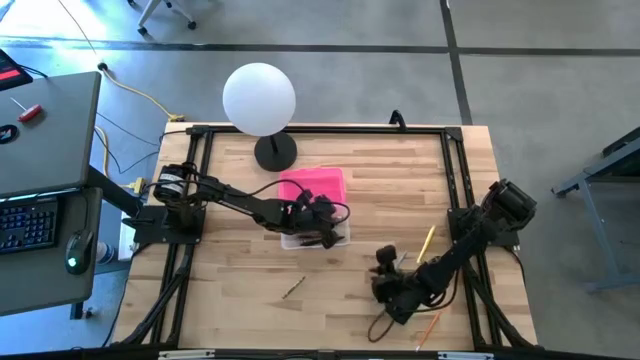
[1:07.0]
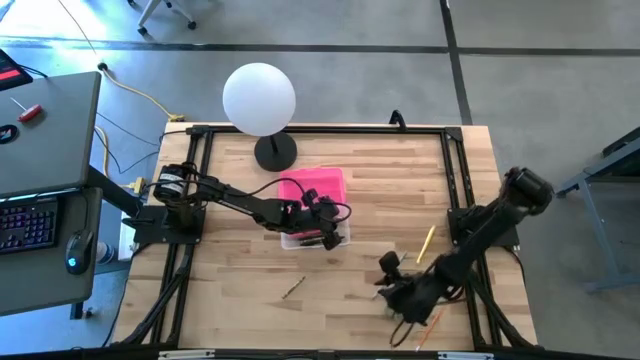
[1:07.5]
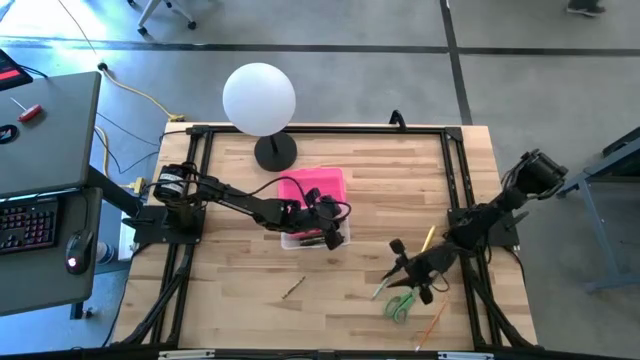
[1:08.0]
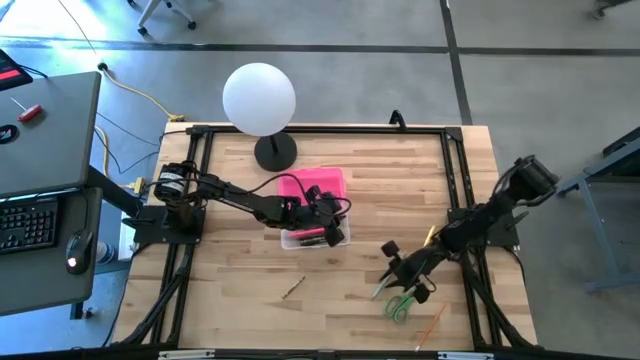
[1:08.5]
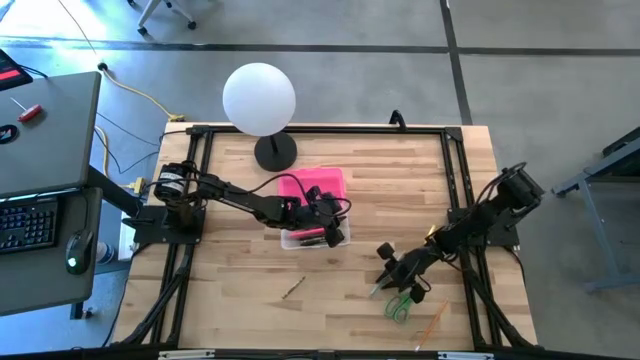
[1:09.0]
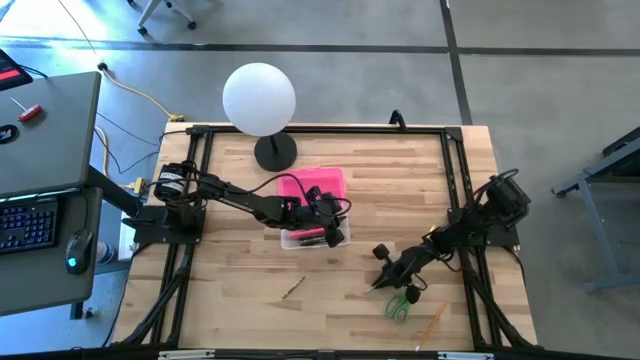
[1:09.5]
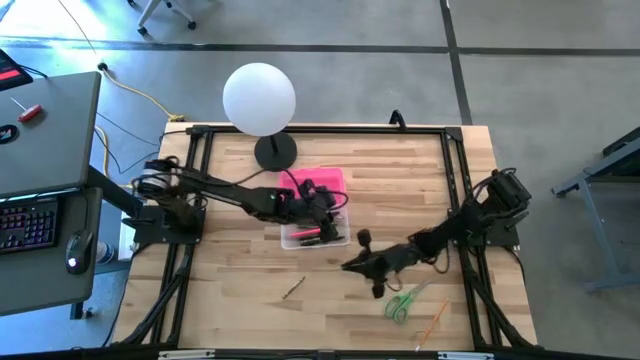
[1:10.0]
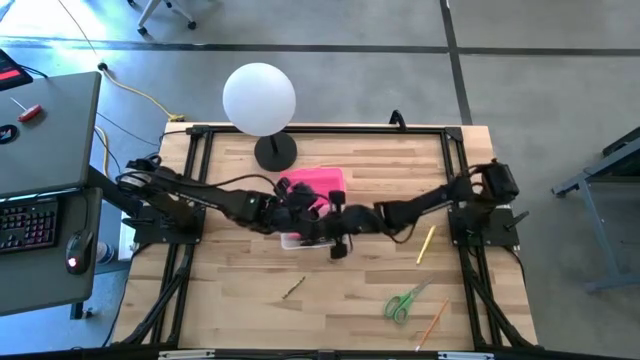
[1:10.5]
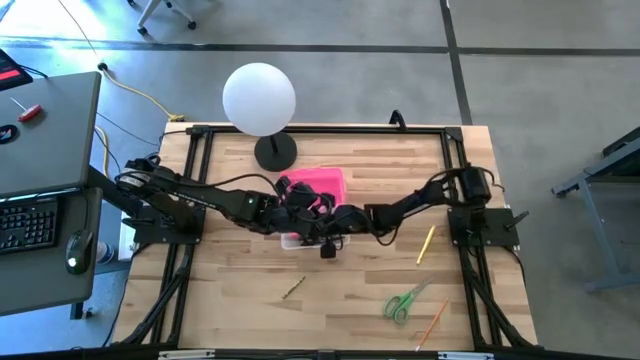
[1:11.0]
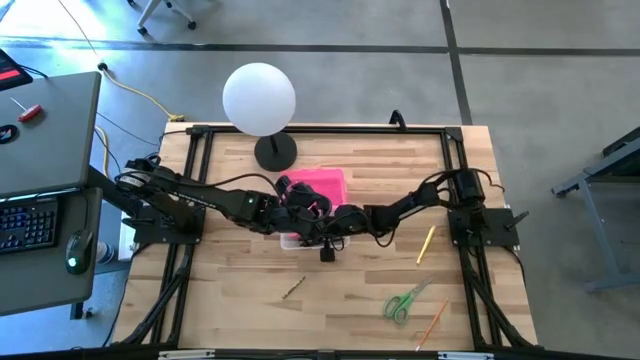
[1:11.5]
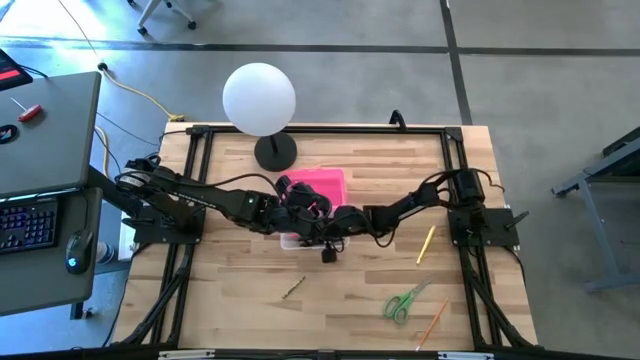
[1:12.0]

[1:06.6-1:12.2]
Task: Pick & place school supplies into a supply box
Put the blue pencil into the pink supply box

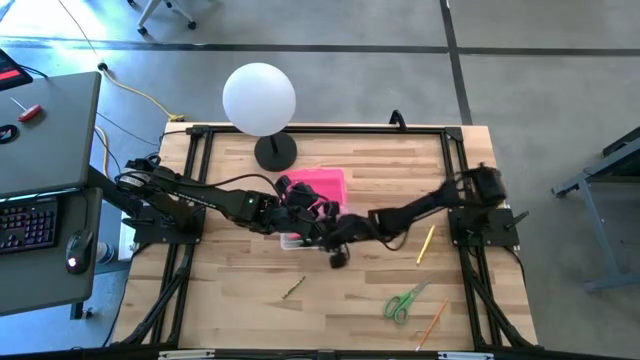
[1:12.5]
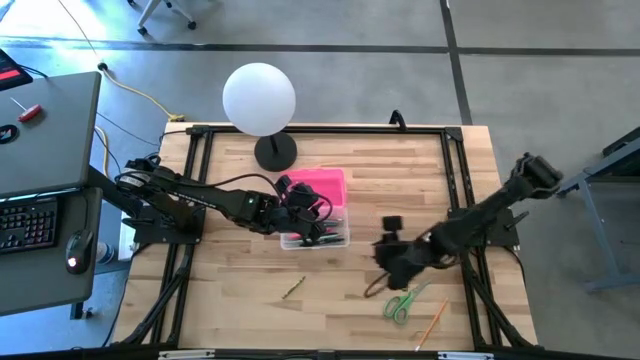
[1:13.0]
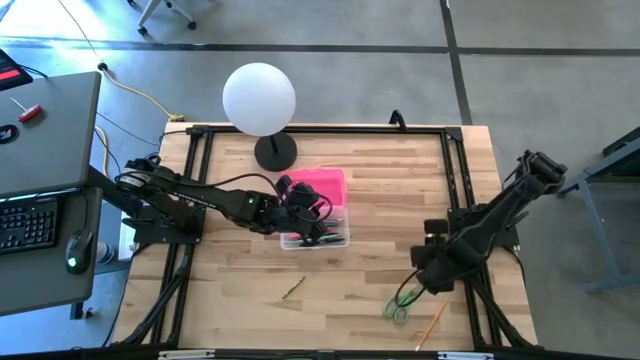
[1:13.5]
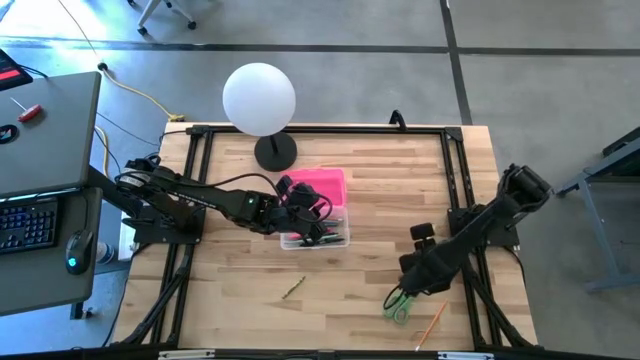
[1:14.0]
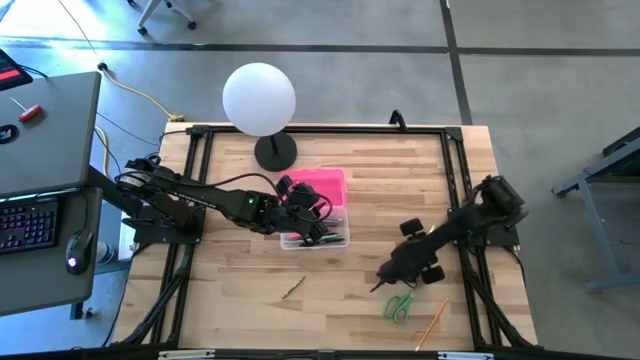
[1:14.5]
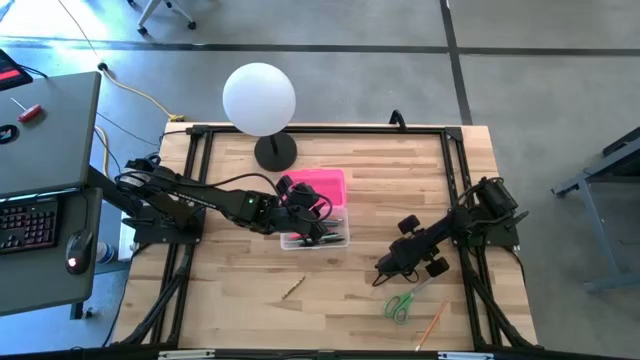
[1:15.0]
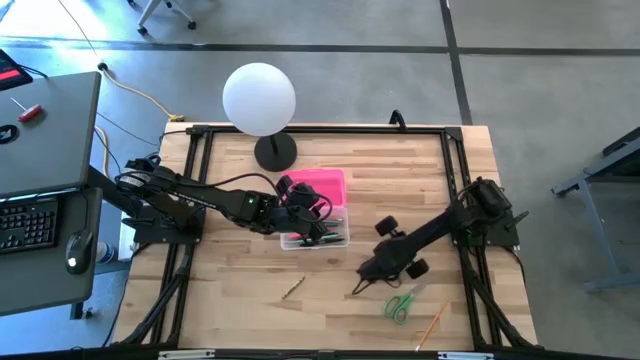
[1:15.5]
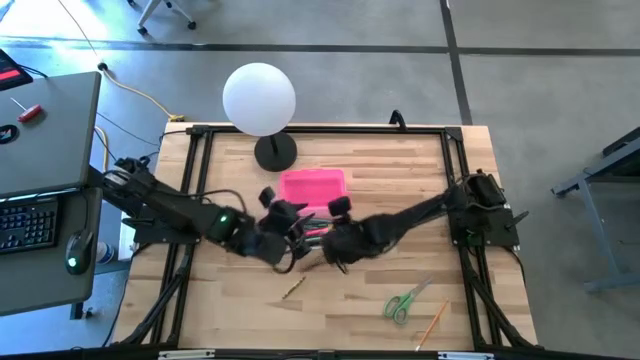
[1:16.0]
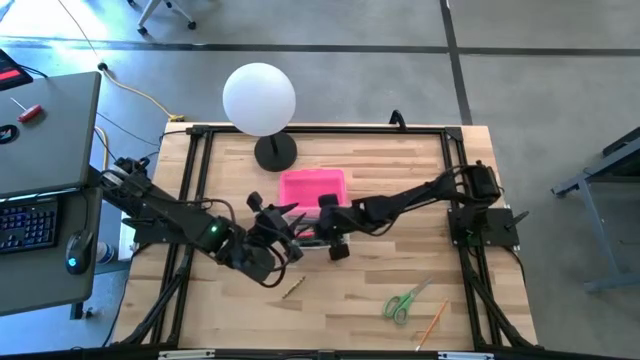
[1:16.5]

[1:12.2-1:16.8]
Put the yellow pen into the pink supply box

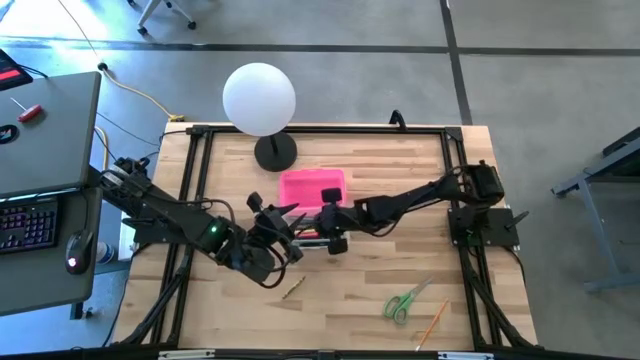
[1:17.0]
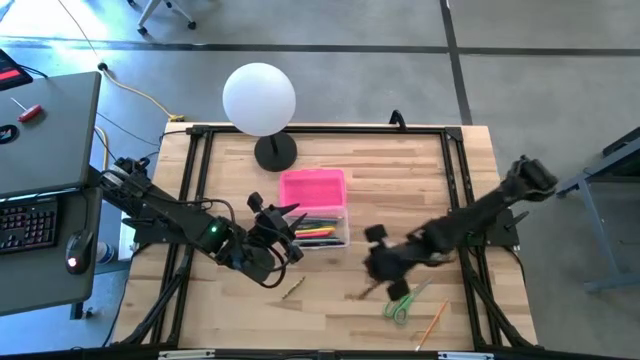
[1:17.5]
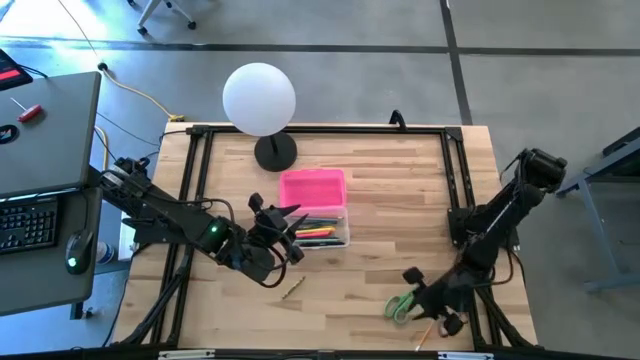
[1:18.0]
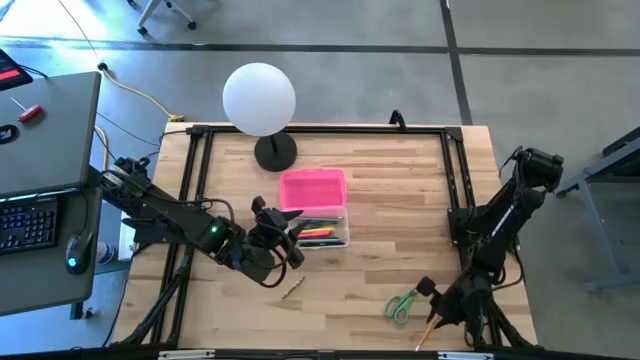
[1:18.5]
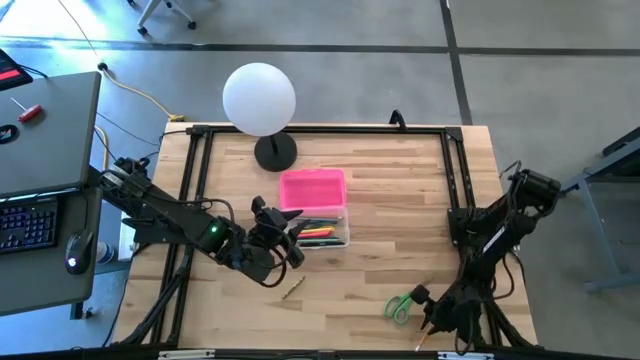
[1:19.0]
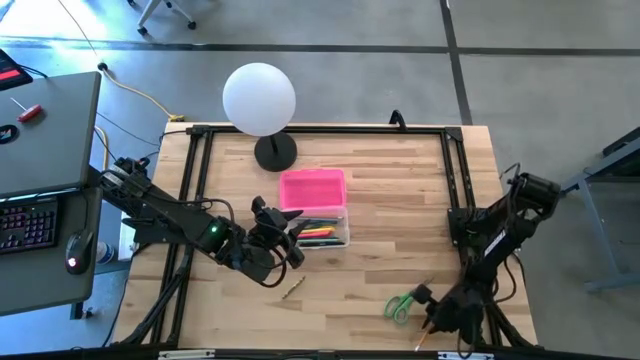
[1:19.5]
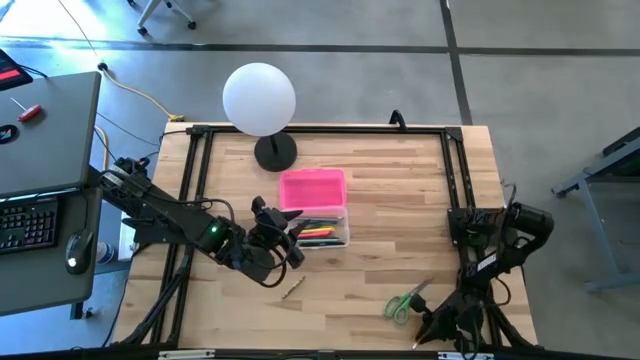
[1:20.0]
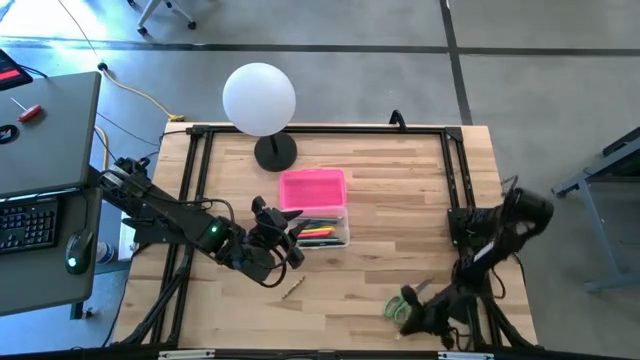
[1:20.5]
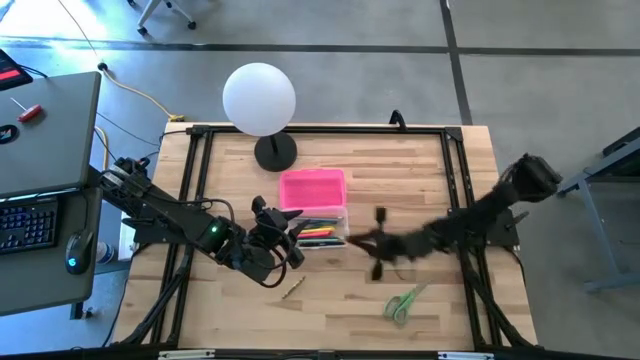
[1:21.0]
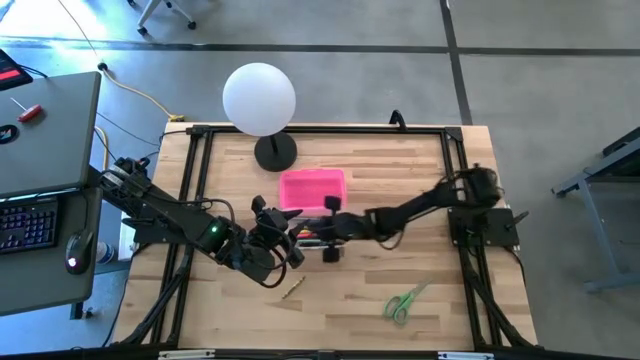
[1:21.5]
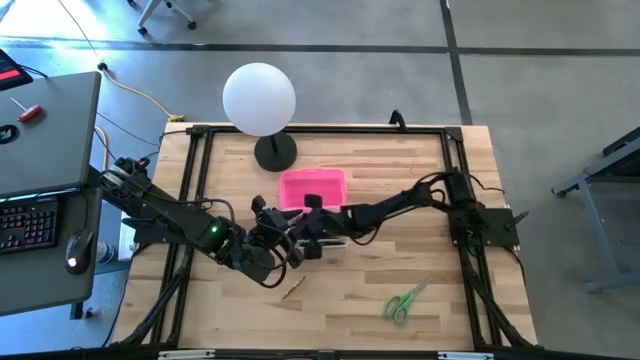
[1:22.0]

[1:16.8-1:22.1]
Put the orange pencil into the pink supply box

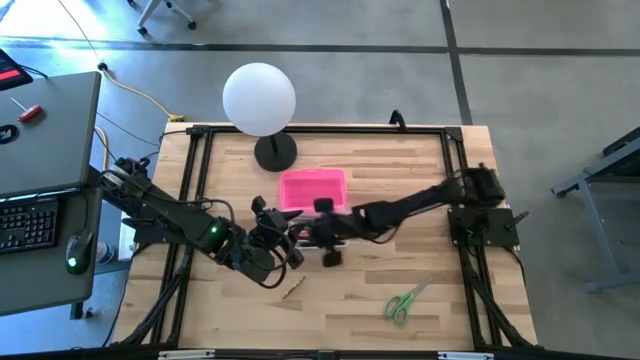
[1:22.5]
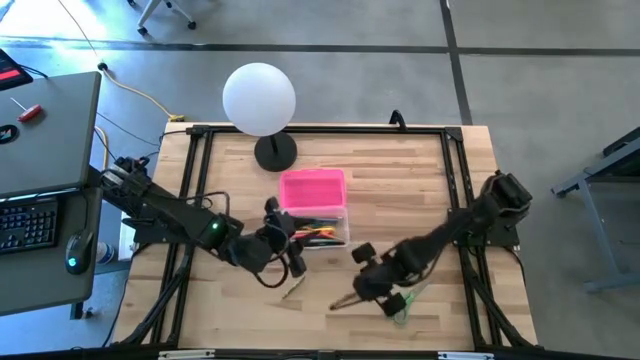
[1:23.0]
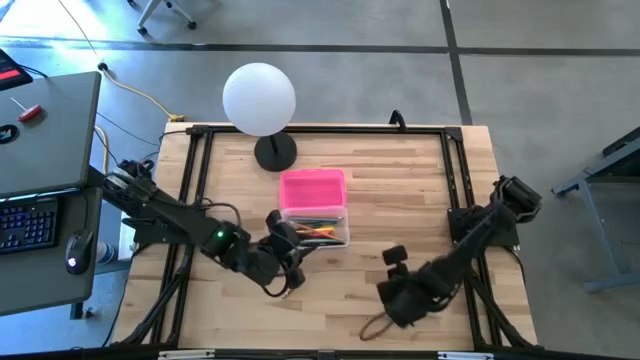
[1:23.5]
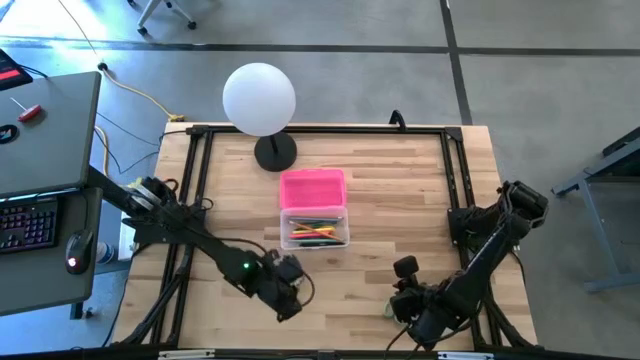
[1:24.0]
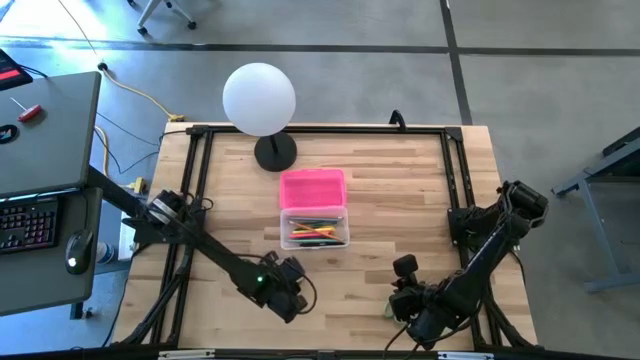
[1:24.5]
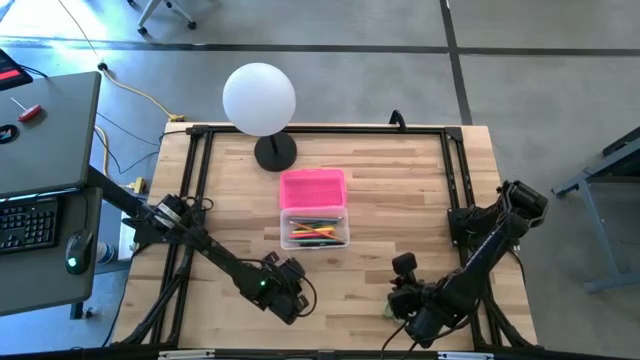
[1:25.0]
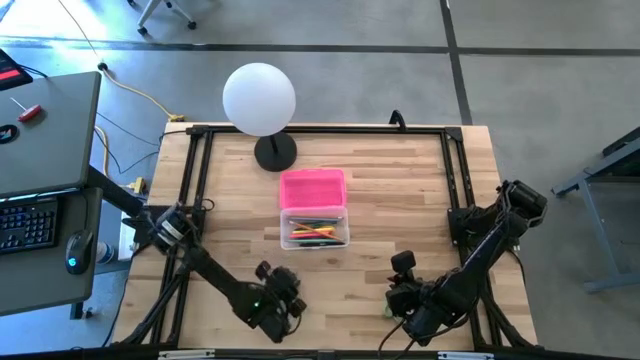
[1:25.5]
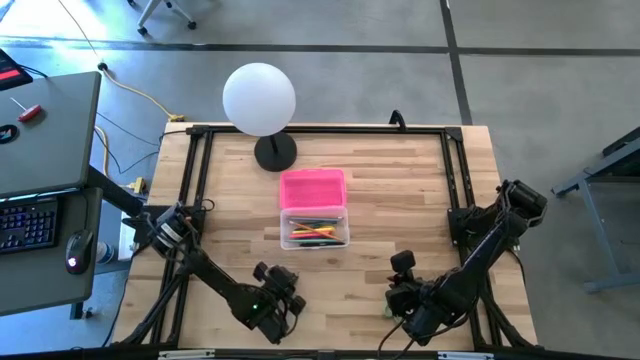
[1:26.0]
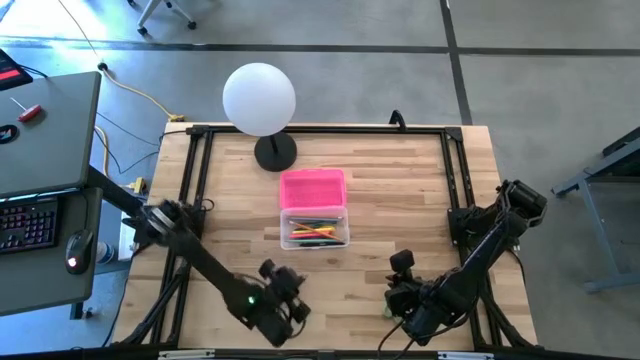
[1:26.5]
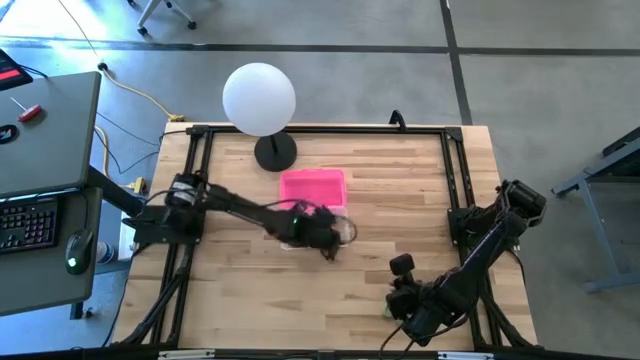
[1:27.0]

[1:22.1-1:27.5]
Put the light green crayon into the pink supply box
